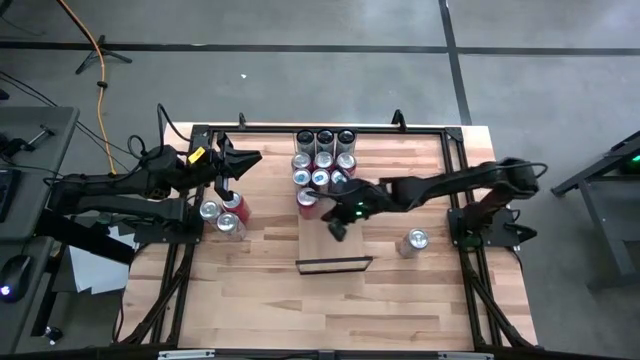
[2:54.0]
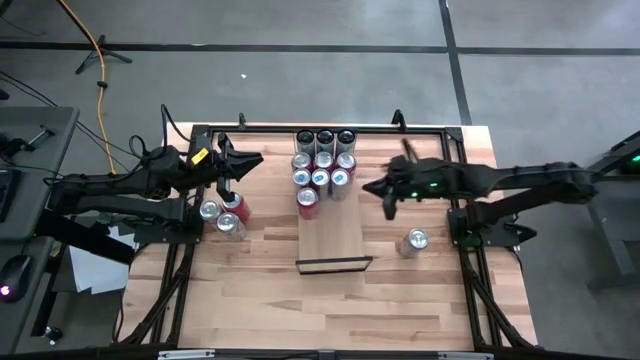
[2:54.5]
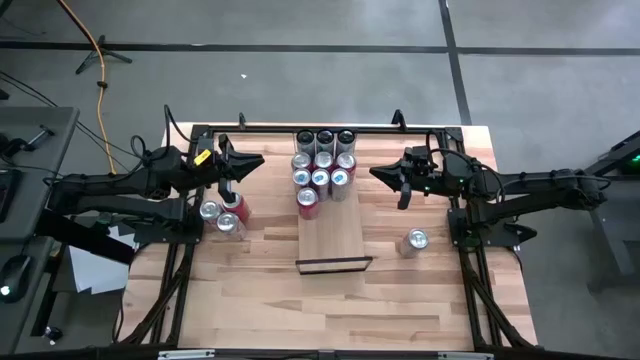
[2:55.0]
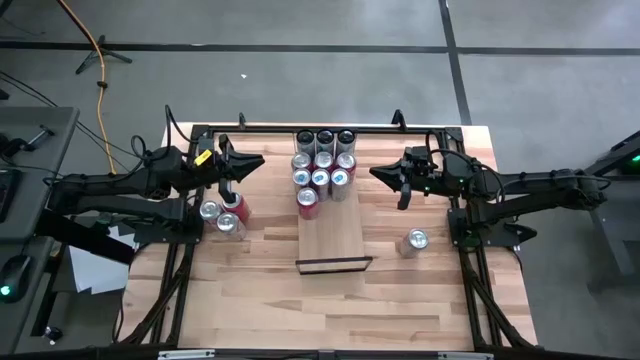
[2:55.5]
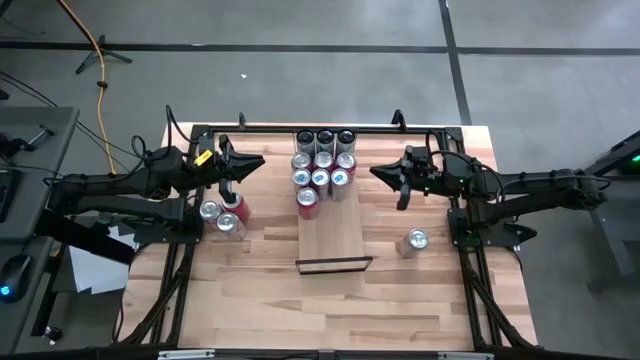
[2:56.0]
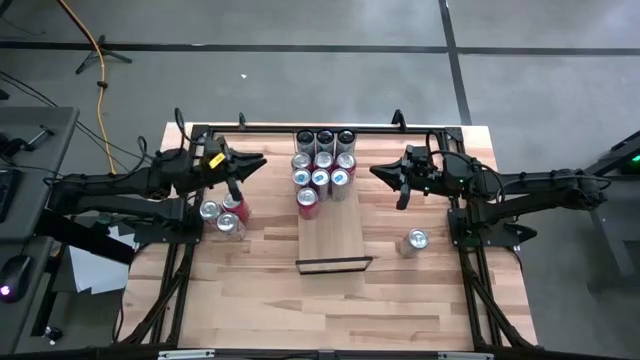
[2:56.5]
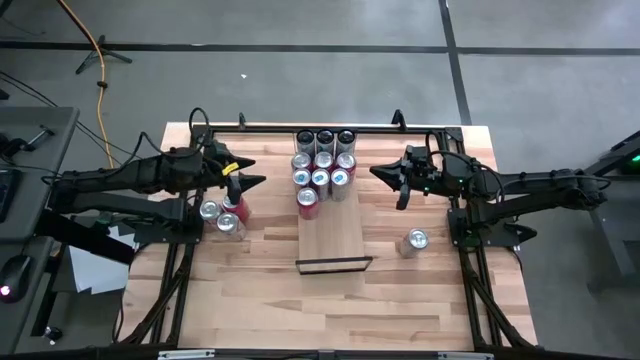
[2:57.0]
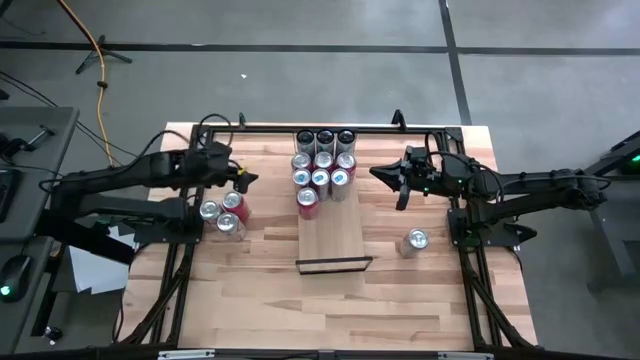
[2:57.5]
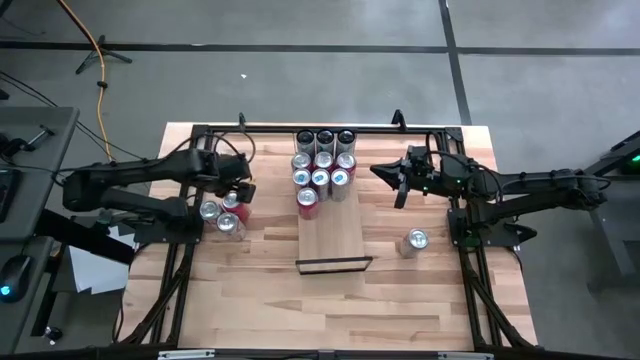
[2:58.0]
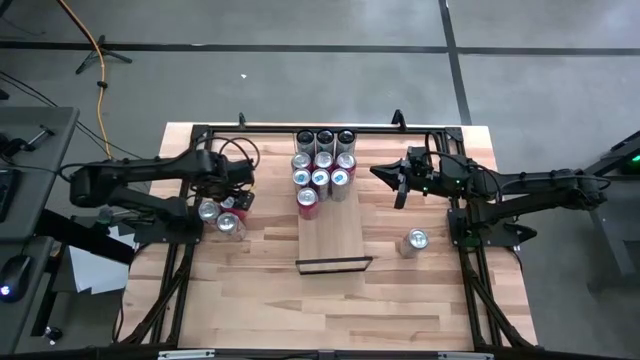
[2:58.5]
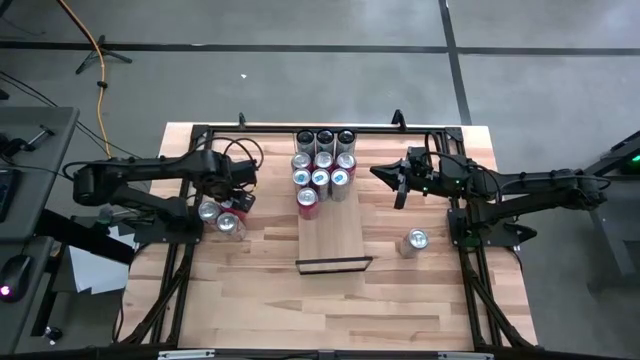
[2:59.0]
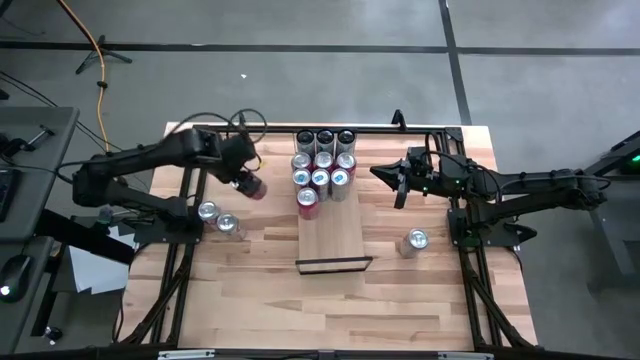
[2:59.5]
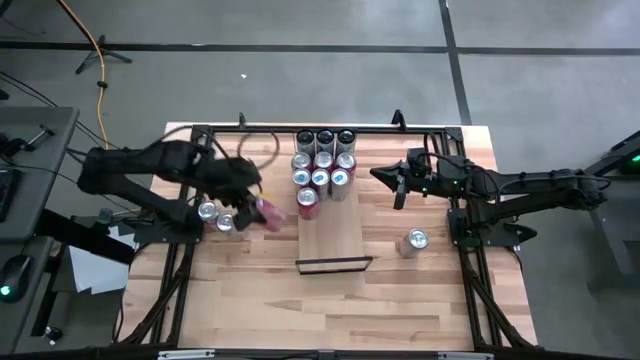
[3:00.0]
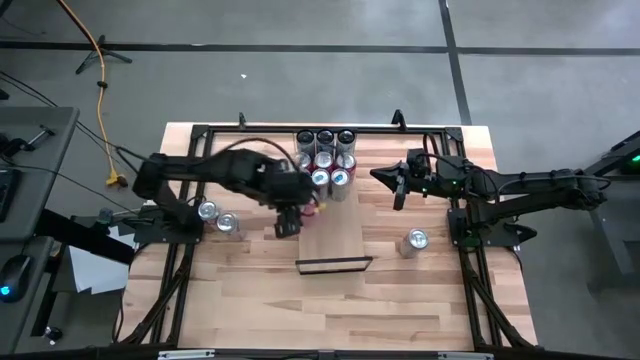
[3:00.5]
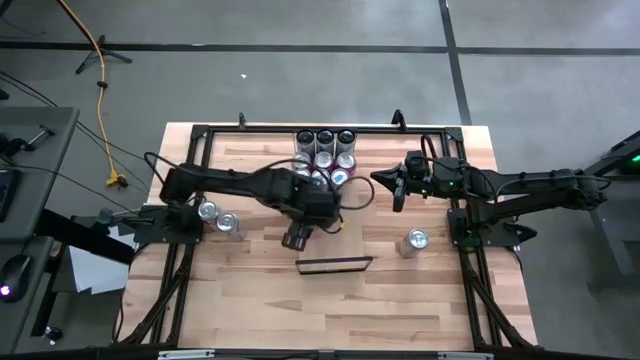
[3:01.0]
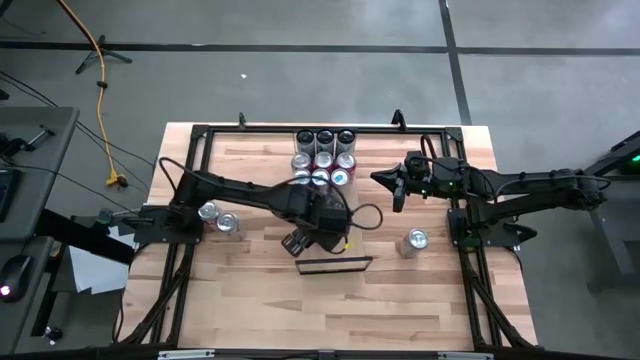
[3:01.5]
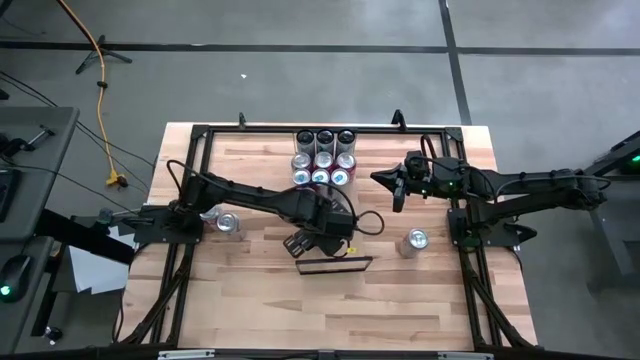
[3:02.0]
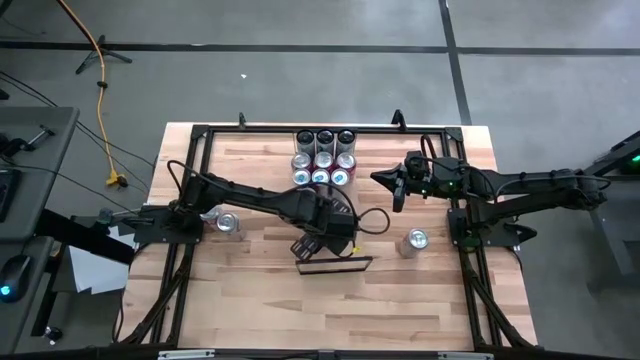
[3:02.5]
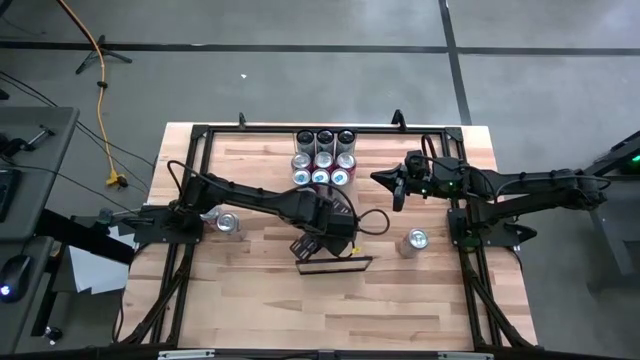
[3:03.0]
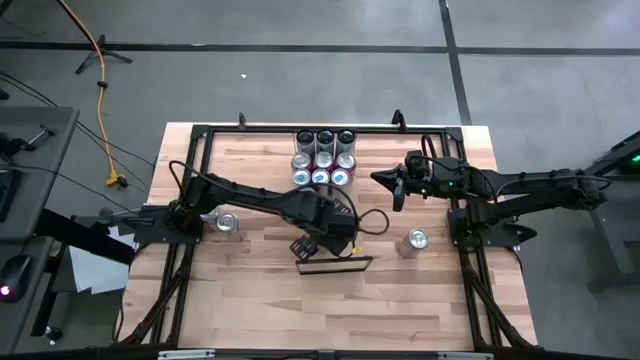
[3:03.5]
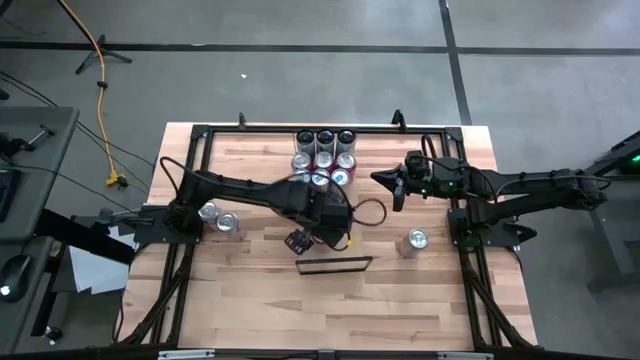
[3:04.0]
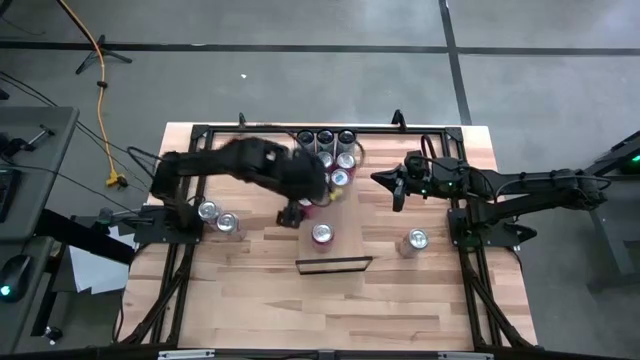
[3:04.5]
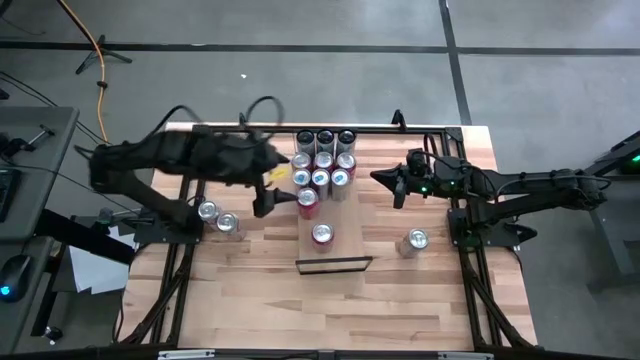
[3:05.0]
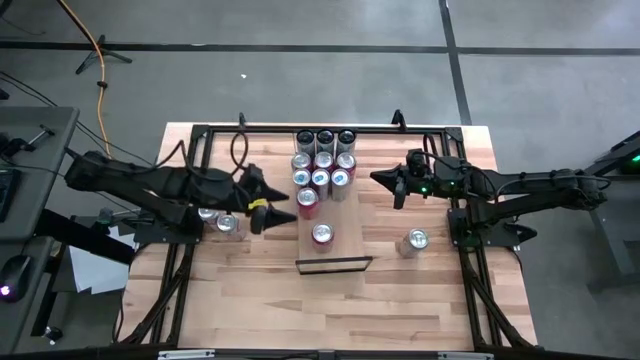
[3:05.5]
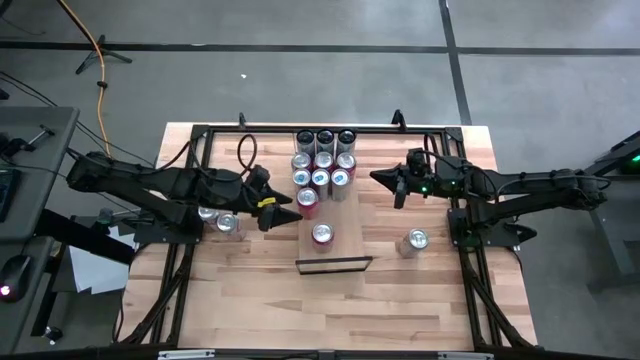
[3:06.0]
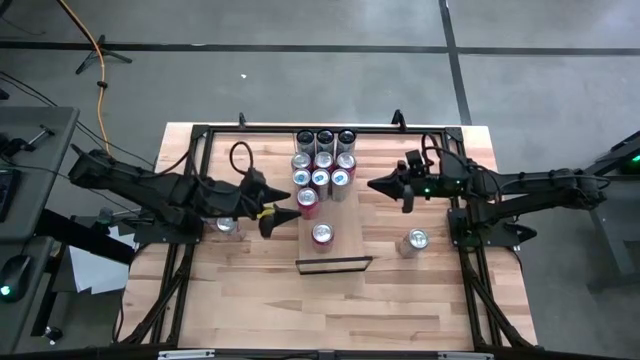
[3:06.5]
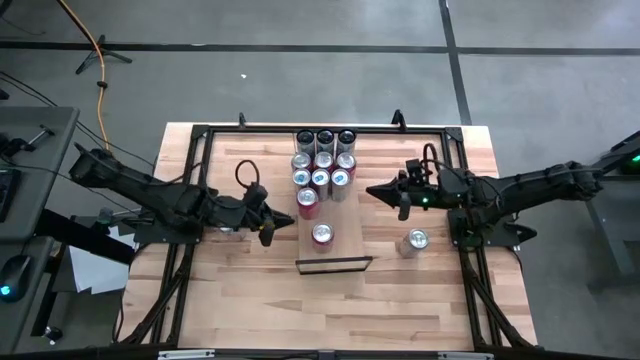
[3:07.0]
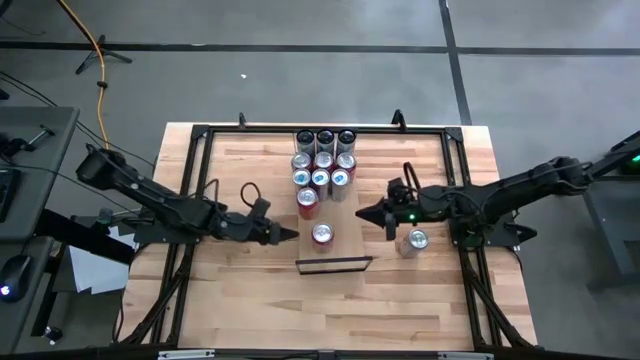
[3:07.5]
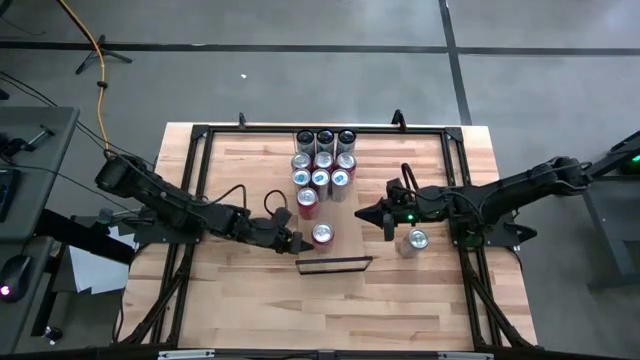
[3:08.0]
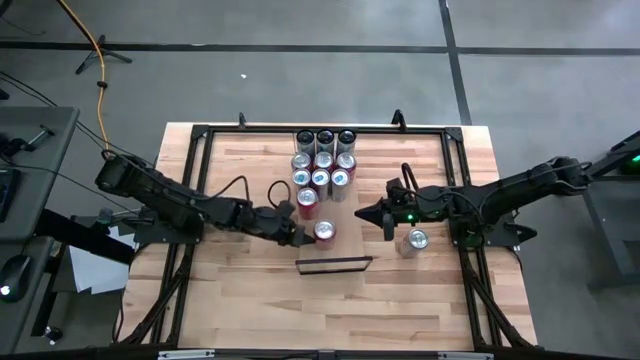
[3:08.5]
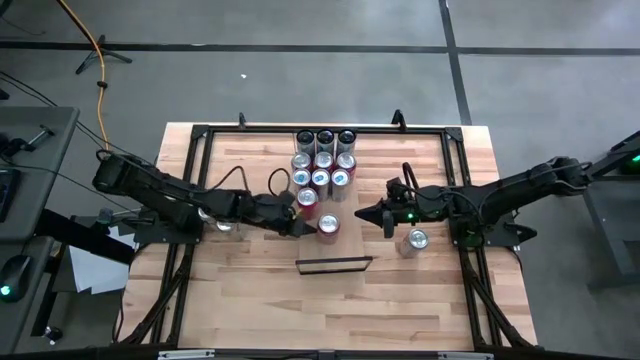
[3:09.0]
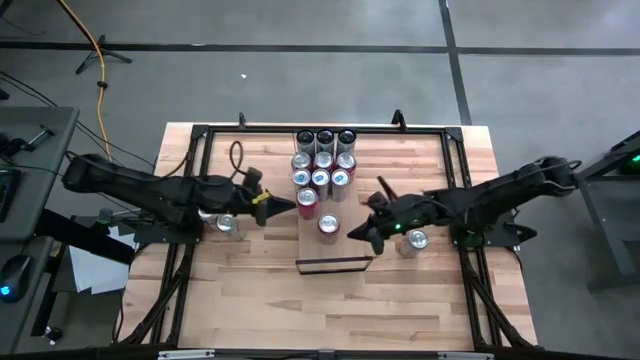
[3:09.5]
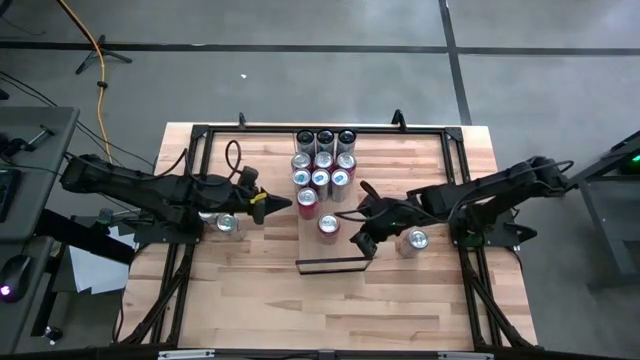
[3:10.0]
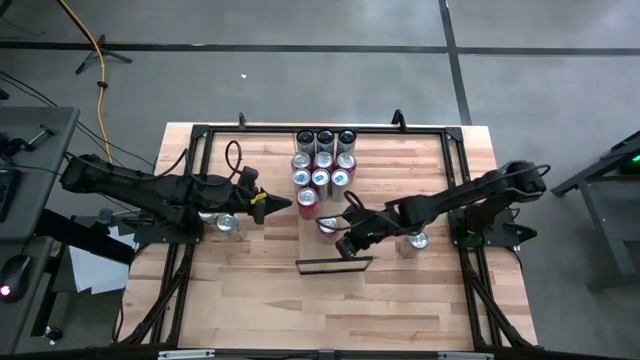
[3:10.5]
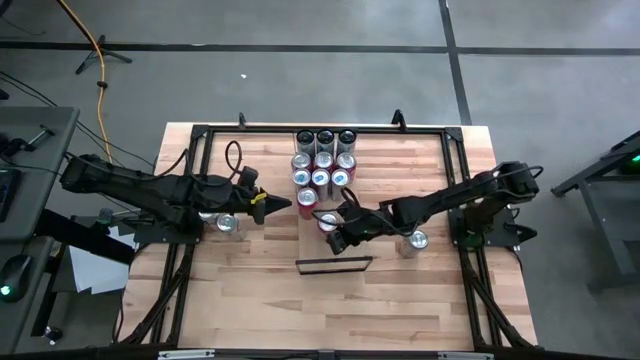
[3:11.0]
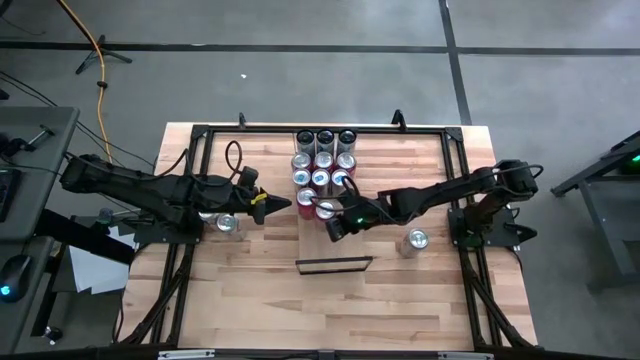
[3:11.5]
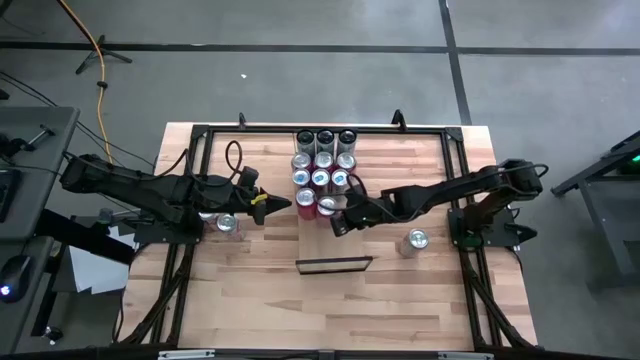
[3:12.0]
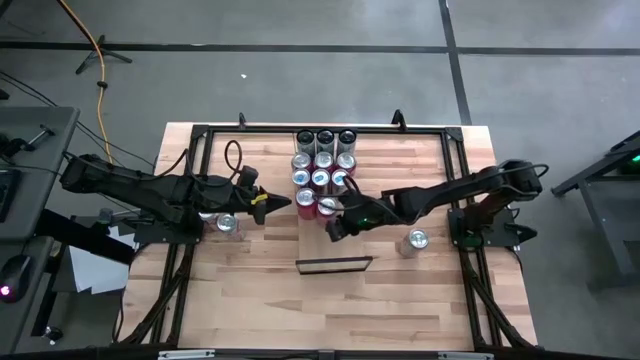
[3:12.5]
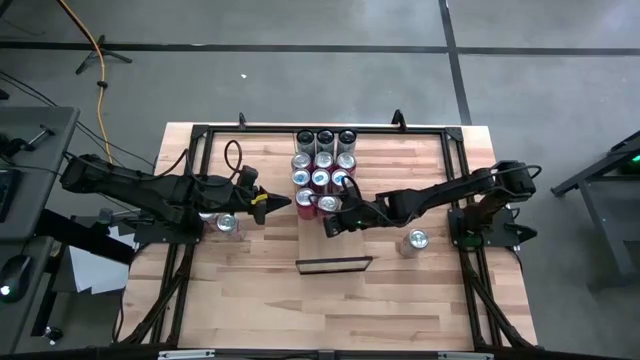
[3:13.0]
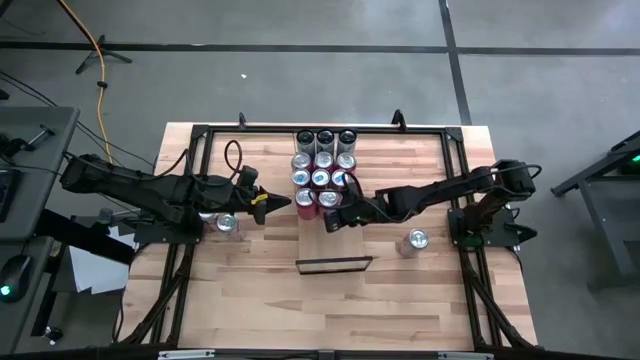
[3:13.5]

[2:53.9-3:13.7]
Task: Place canned beverage on shelf
Put the red soda can on the shelf aligned with the other red soda cans

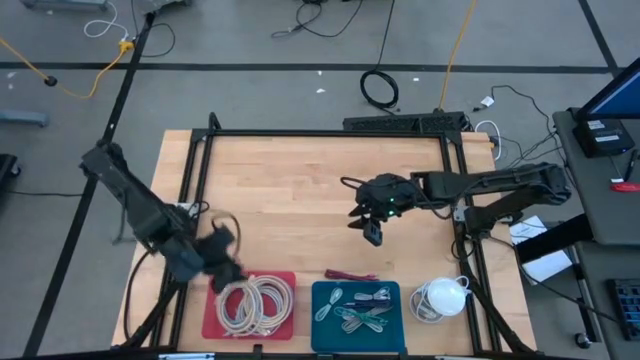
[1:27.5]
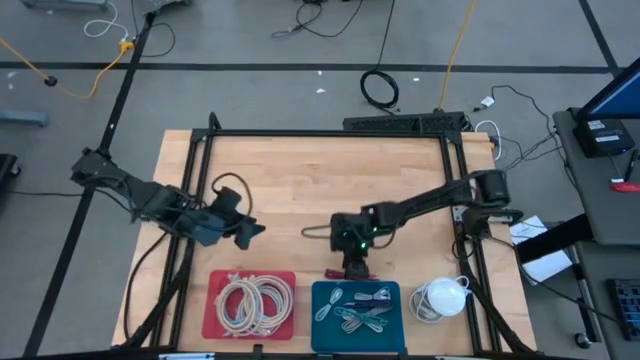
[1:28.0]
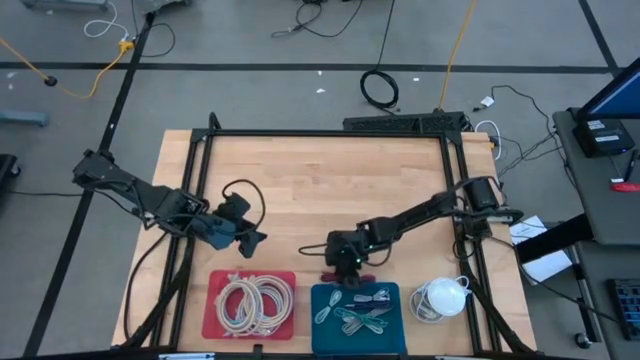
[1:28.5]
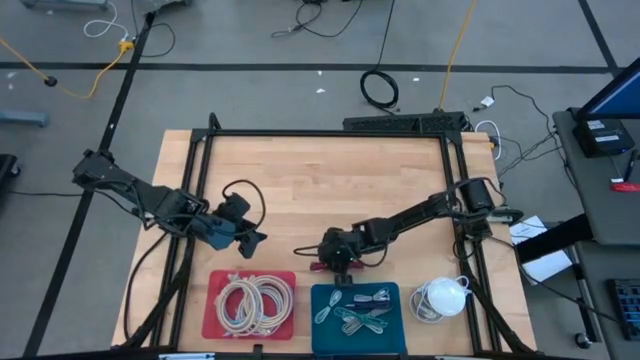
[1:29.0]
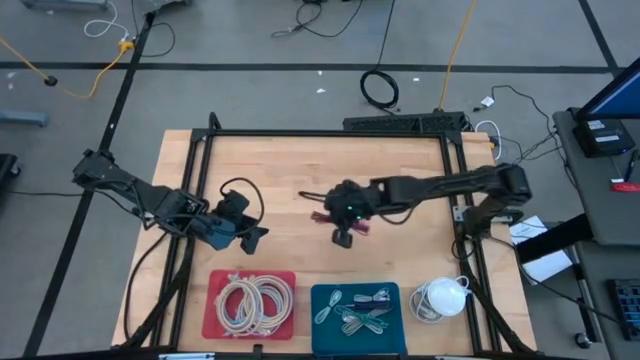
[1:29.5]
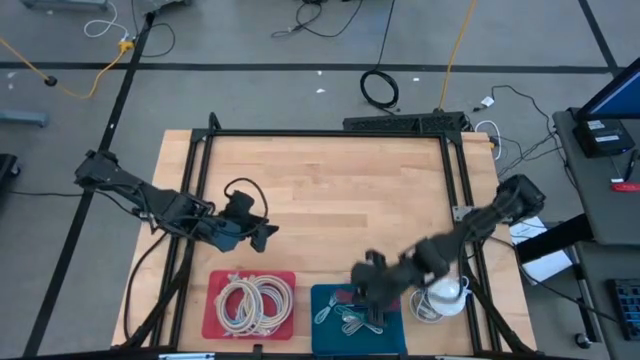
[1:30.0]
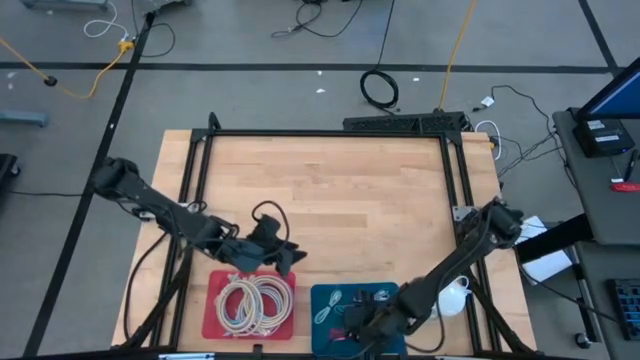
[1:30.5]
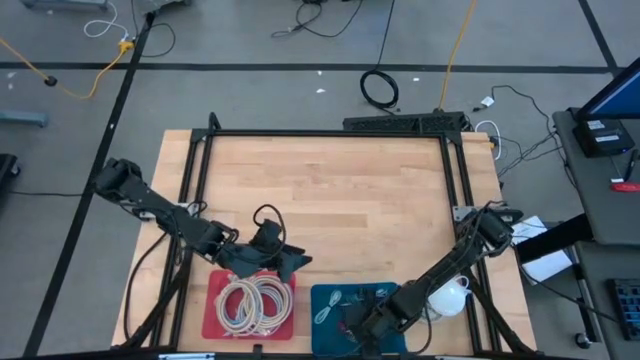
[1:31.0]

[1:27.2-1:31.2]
Task: Pick & Place USB Port
Put the black and red USB cable into the blue bin
